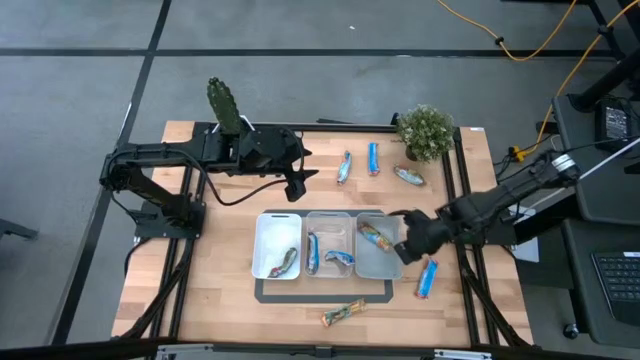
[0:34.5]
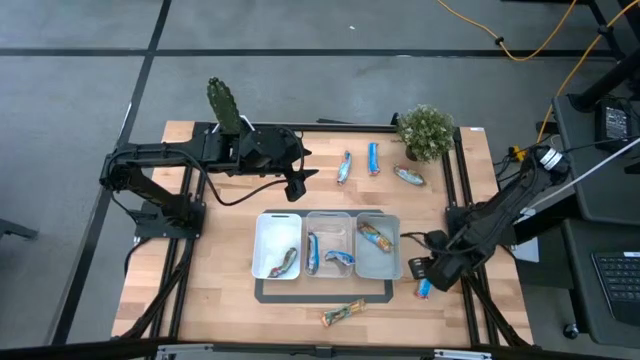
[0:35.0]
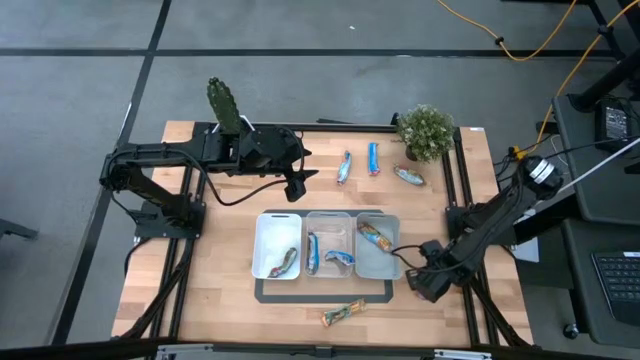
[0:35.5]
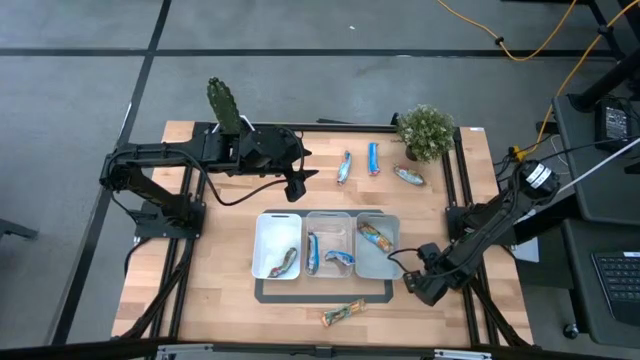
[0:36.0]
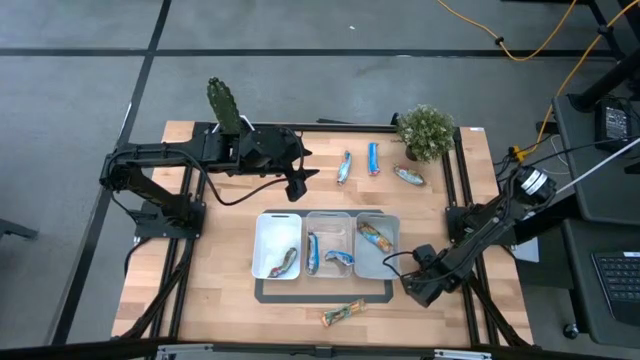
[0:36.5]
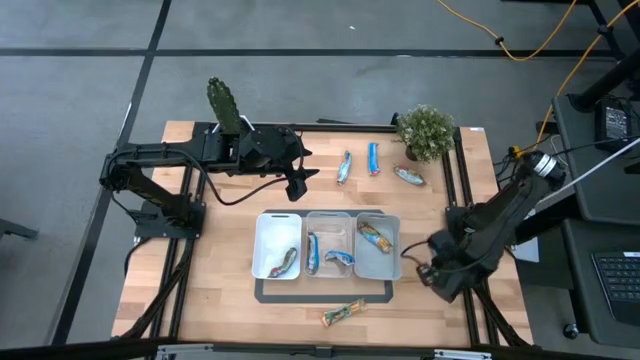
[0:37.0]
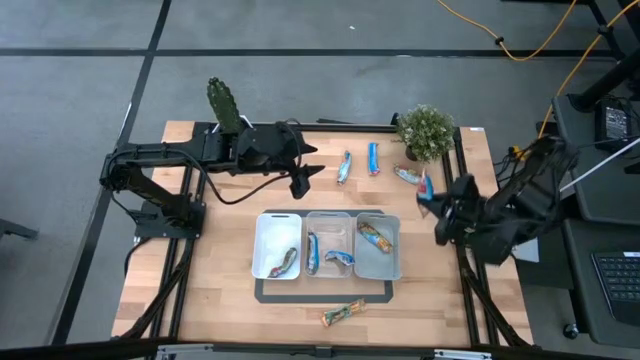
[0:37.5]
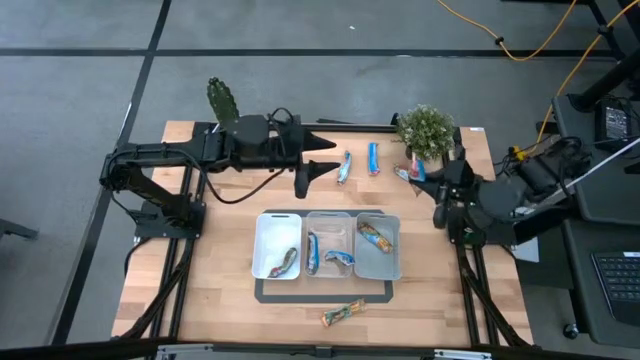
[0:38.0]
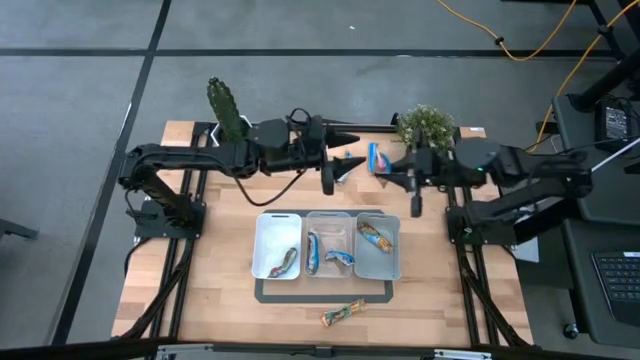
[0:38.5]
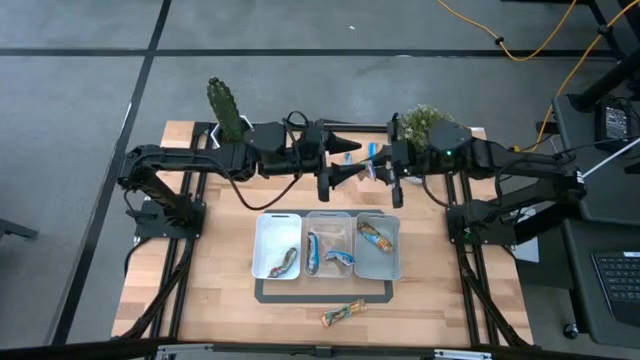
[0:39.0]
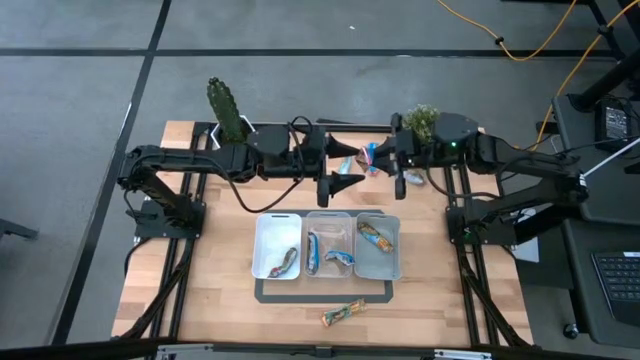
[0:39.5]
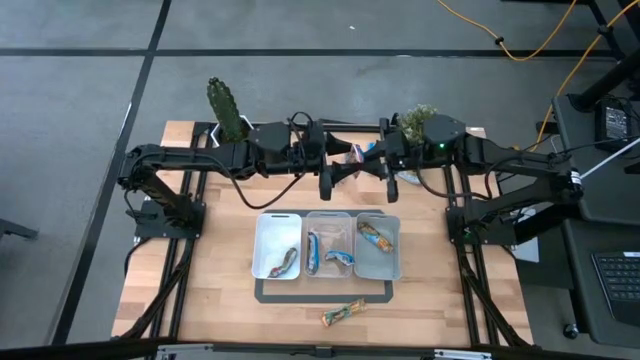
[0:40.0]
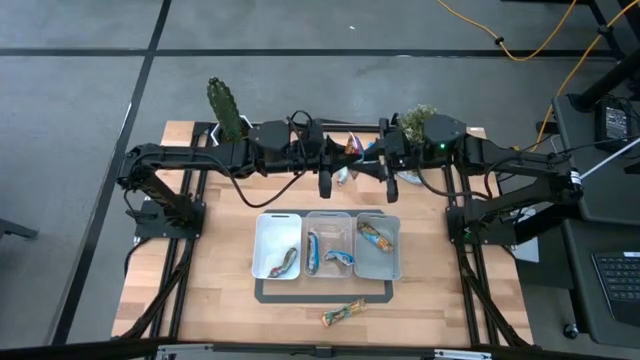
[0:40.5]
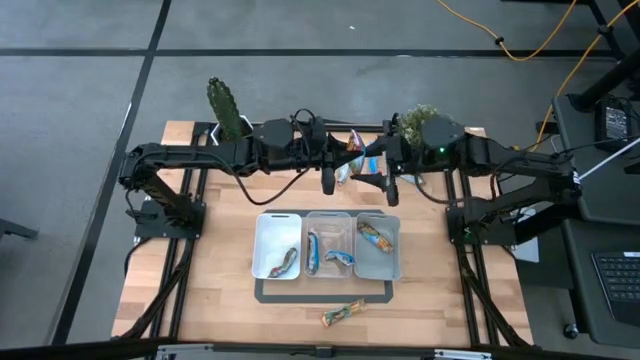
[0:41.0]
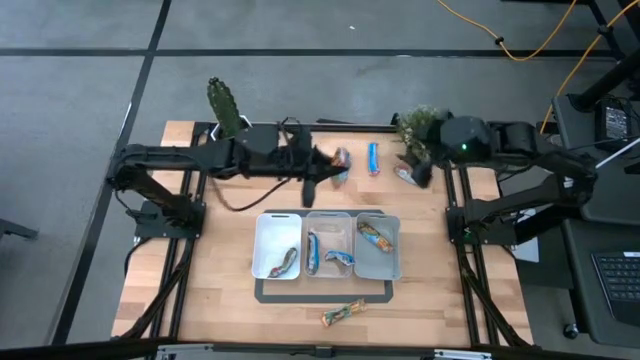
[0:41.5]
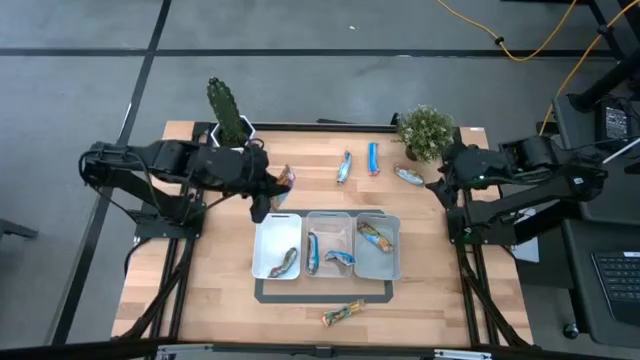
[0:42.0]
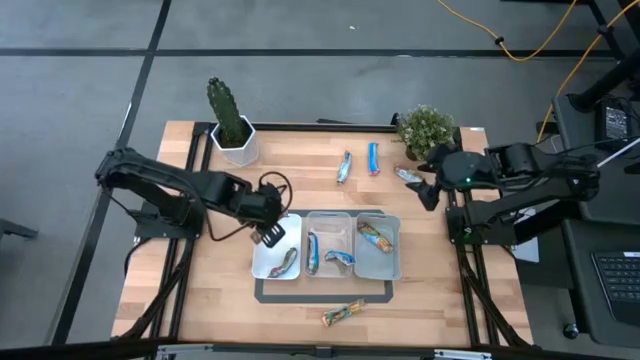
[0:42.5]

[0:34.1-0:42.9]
Task: Pick and place Granola Bars by type
Put the red granola bar into the white bin

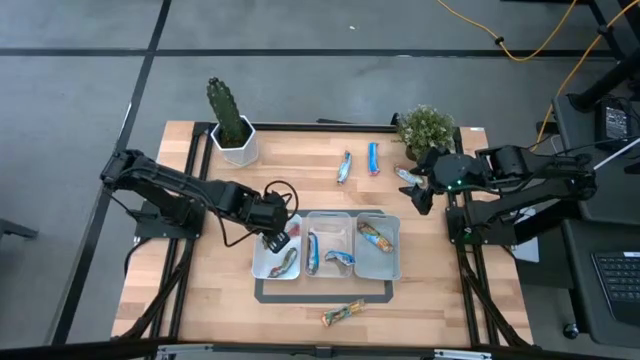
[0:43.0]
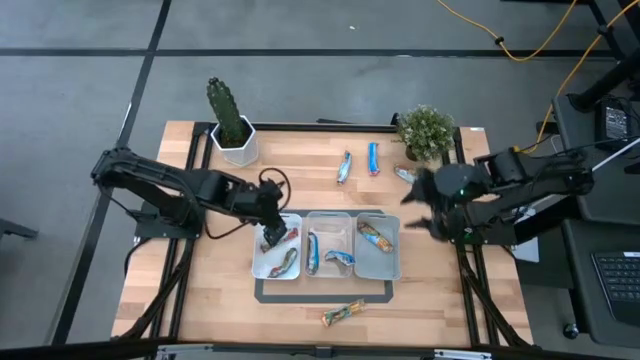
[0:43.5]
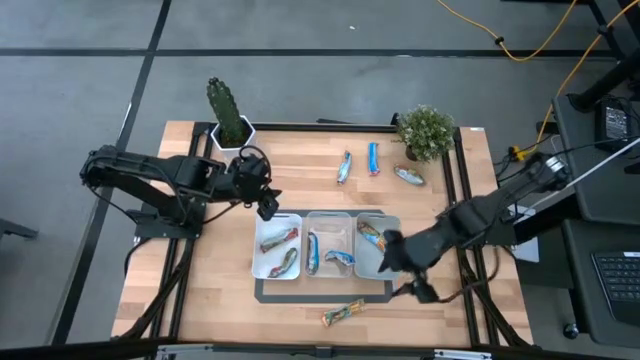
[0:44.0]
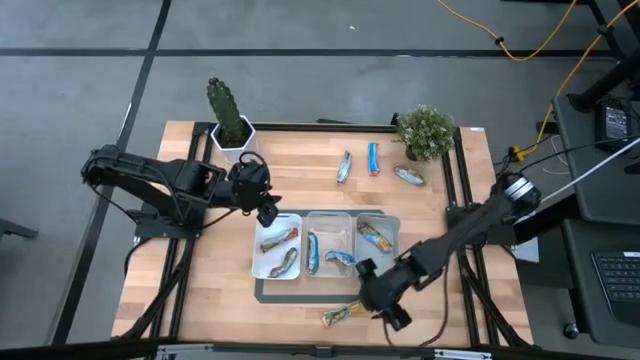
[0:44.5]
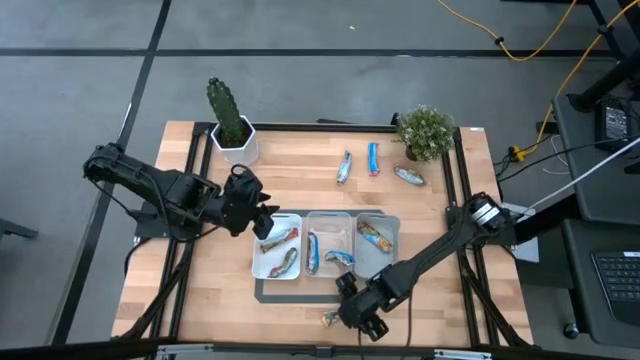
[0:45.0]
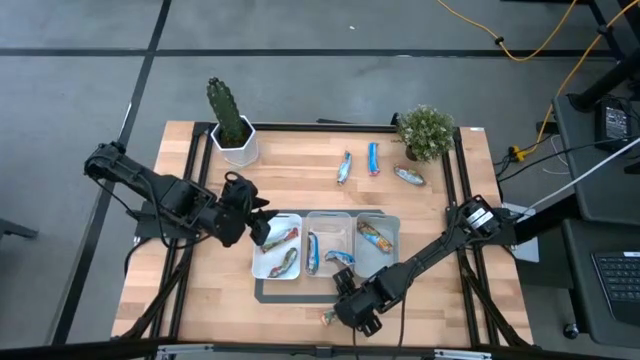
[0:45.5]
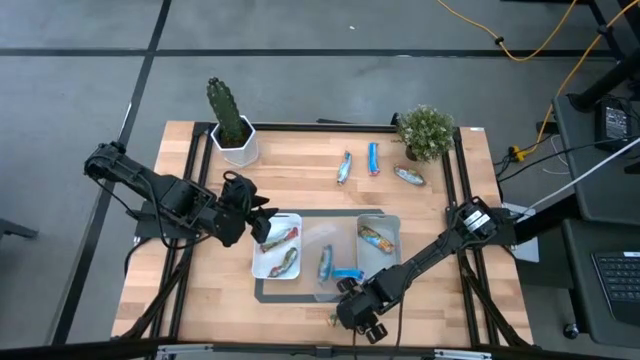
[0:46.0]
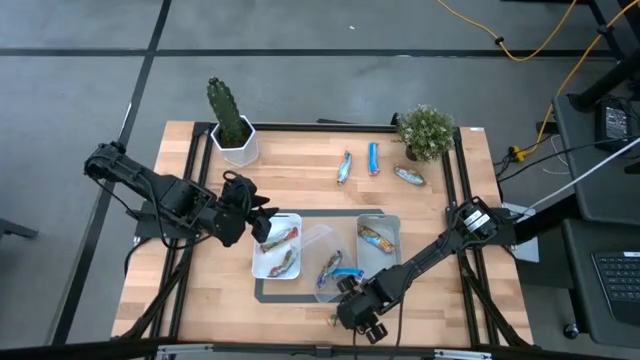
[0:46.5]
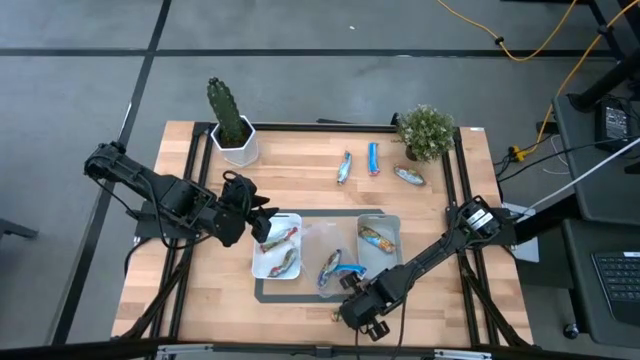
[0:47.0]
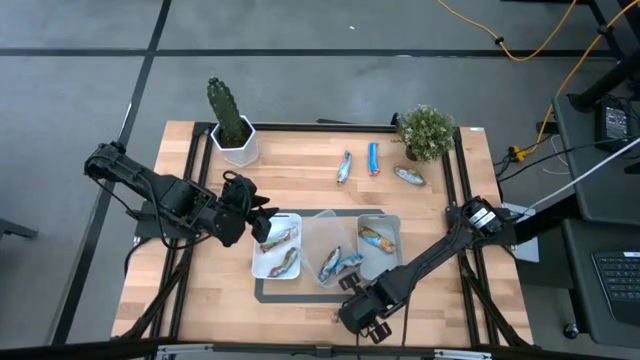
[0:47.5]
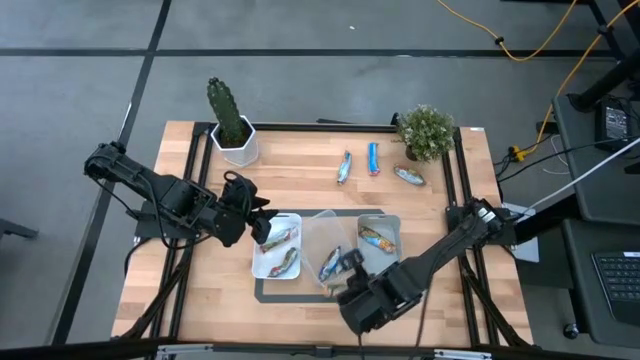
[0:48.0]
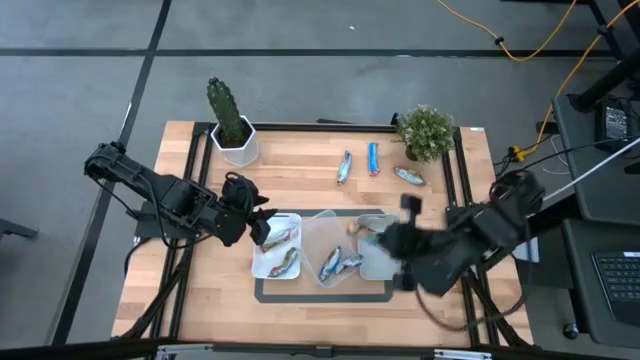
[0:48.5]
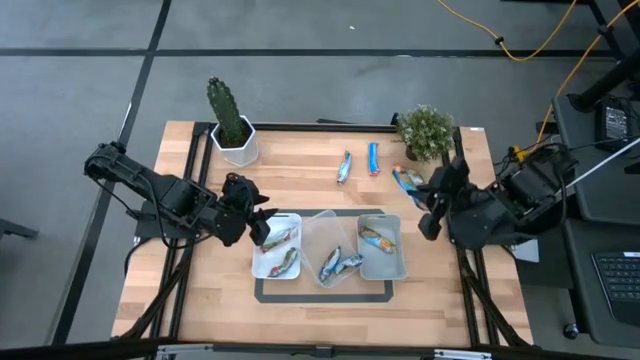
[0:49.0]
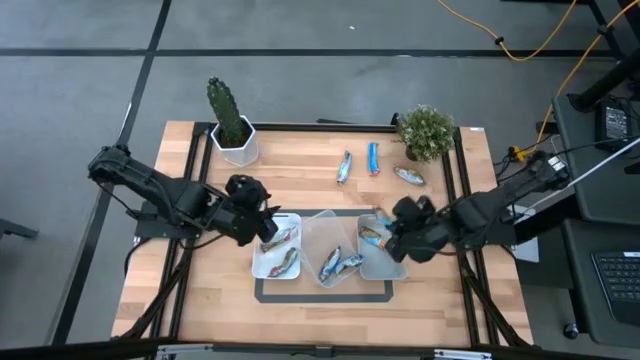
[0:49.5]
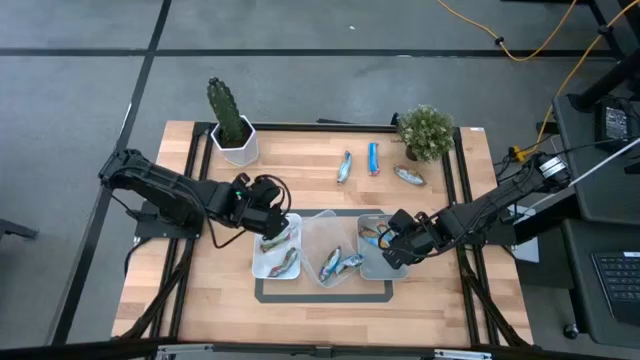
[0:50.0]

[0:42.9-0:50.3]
Put the yellow granola bar into the gray bin

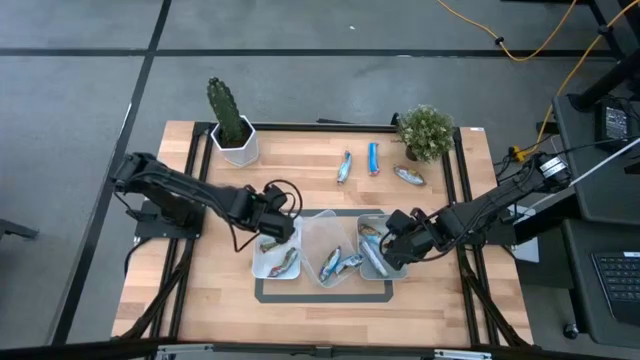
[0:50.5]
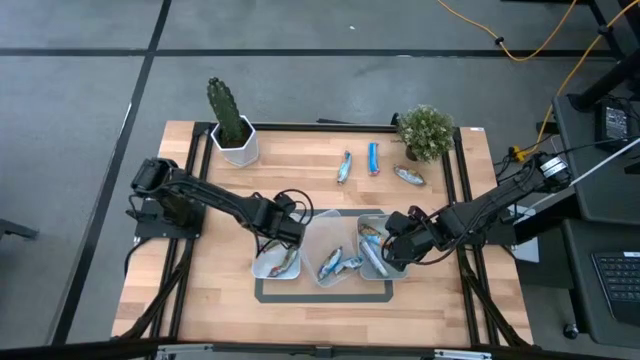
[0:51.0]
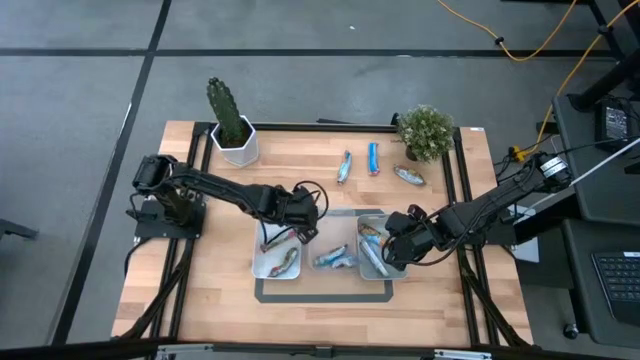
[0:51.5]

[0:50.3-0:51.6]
Adjust the transparent bin

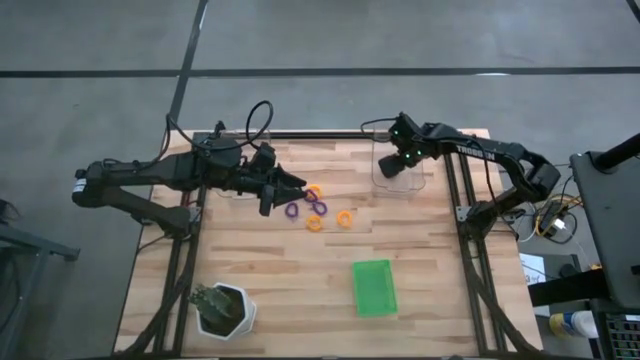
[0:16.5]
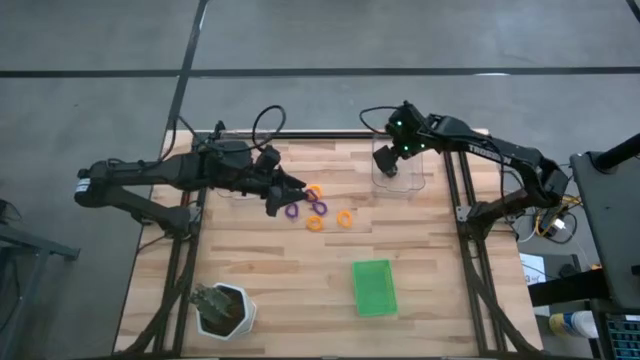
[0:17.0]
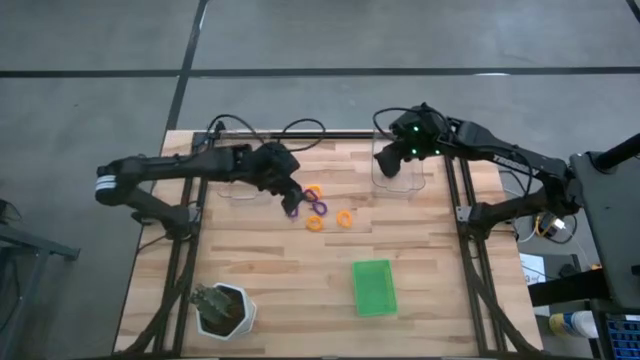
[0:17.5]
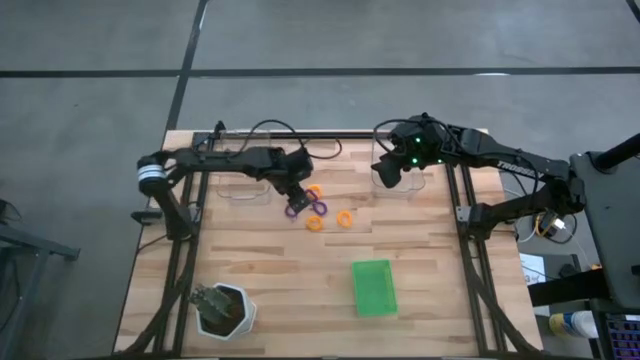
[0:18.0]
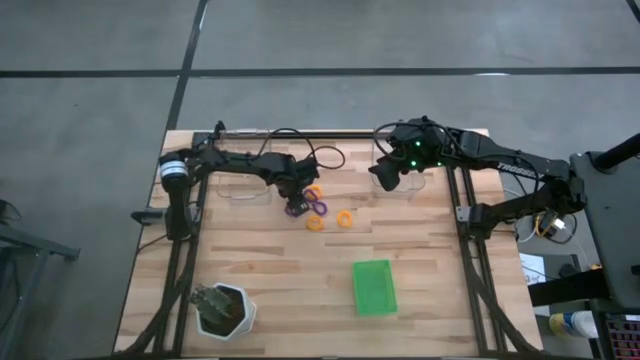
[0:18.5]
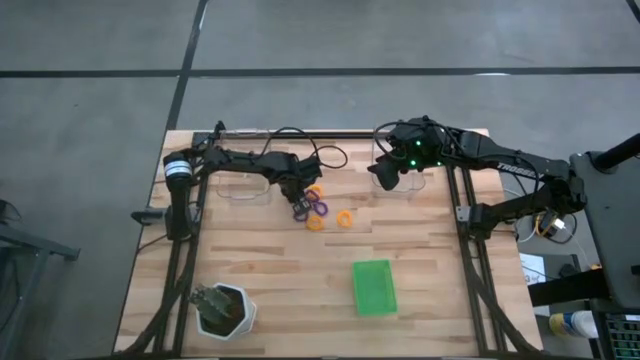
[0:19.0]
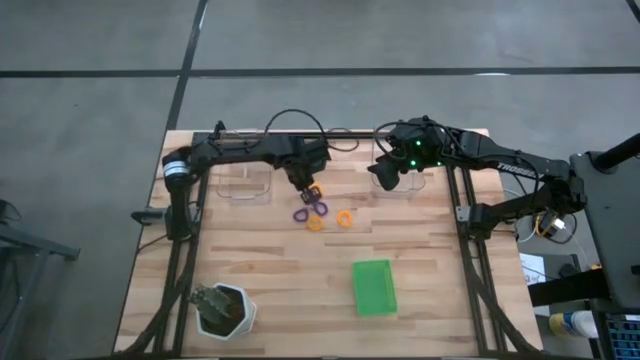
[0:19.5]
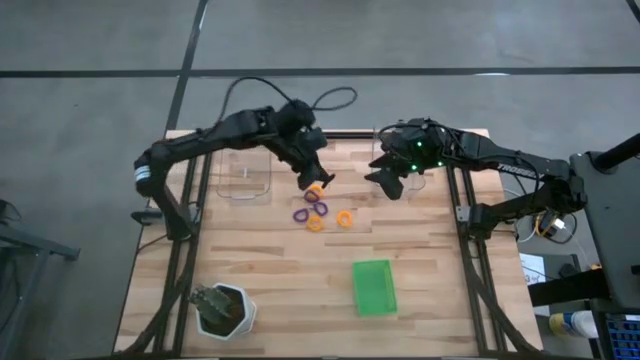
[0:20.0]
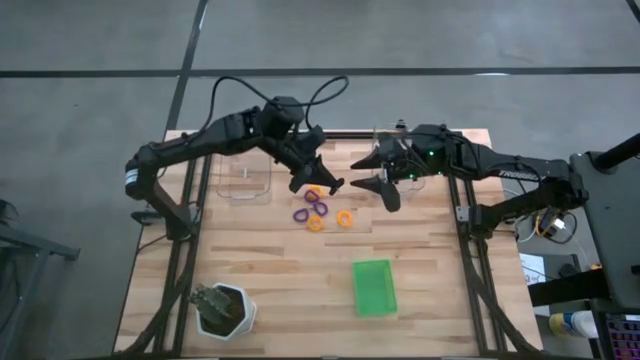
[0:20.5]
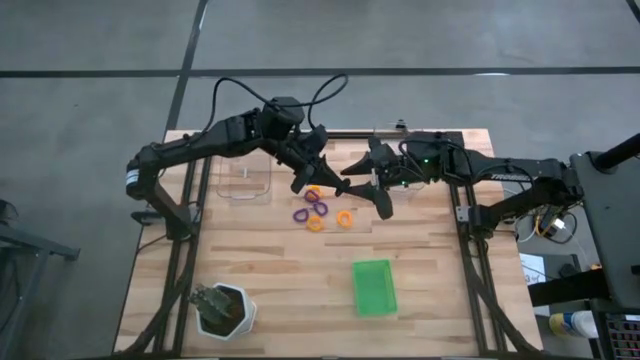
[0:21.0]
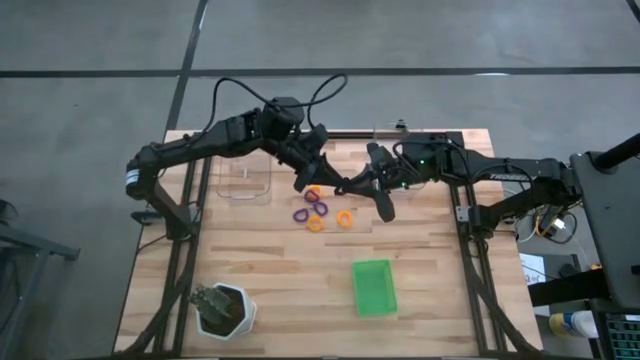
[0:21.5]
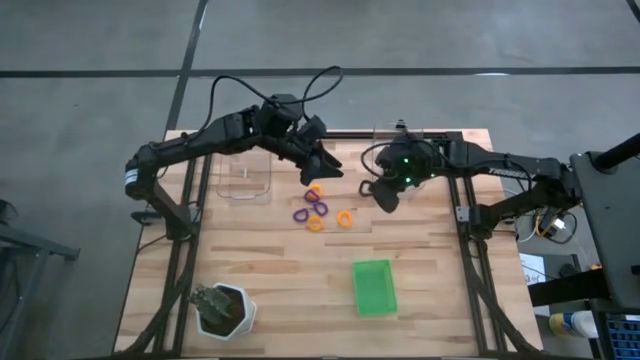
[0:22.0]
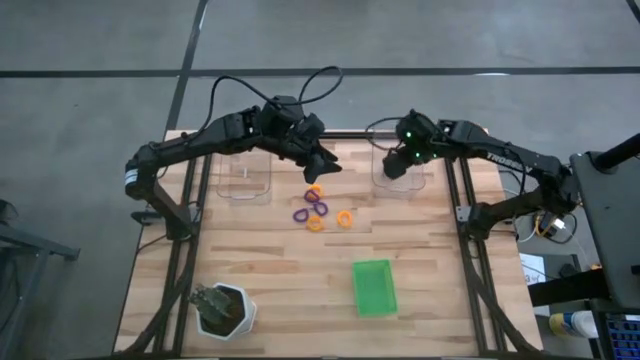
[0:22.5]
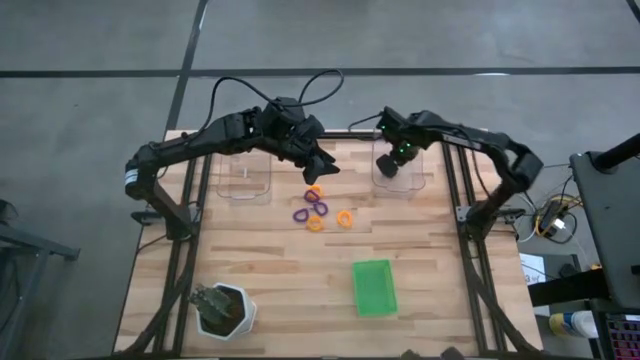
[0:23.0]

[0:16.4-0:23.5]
Task: Sort spring keychains
Put the black spring keychain into the right transparent bin
